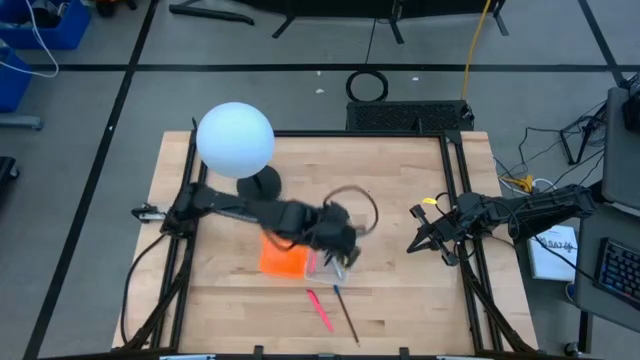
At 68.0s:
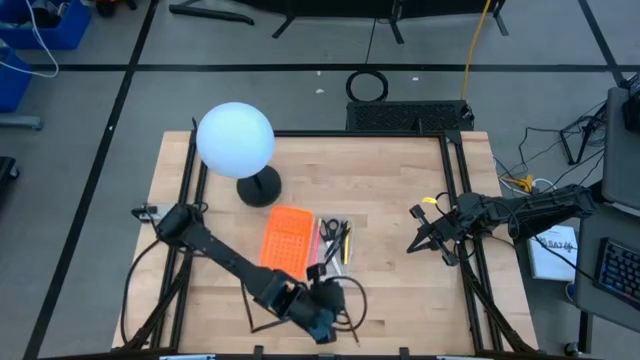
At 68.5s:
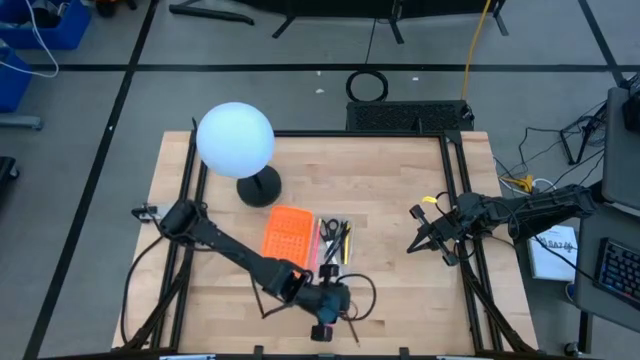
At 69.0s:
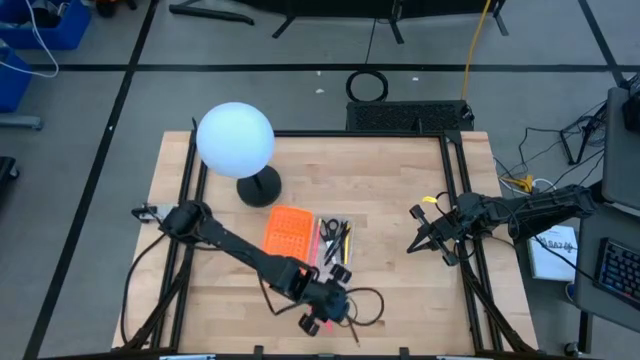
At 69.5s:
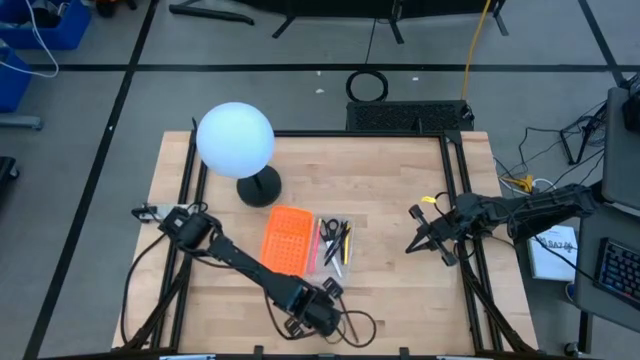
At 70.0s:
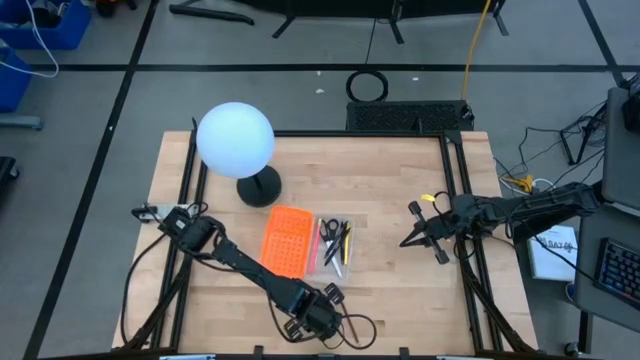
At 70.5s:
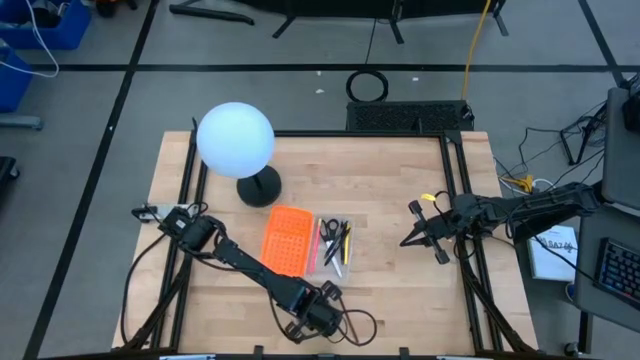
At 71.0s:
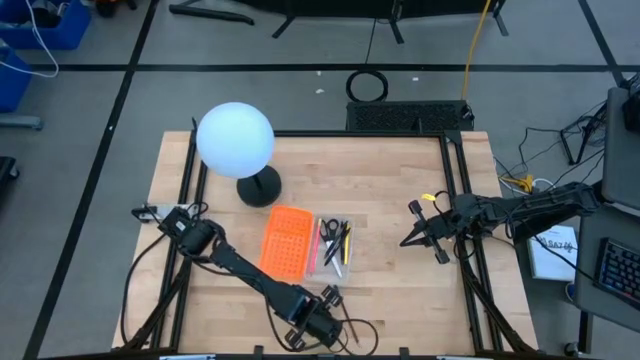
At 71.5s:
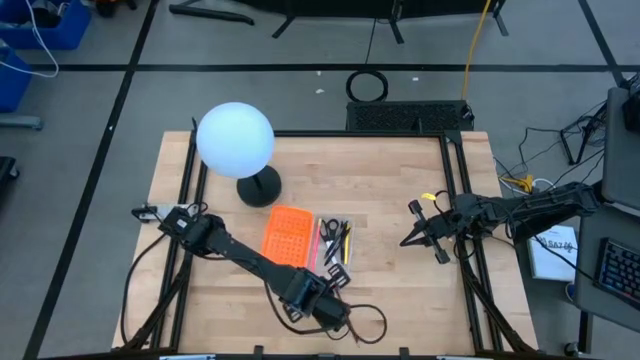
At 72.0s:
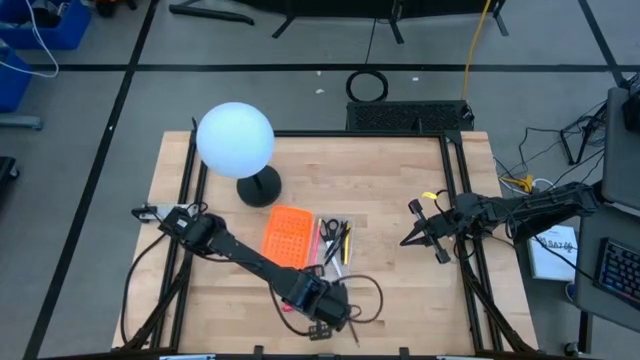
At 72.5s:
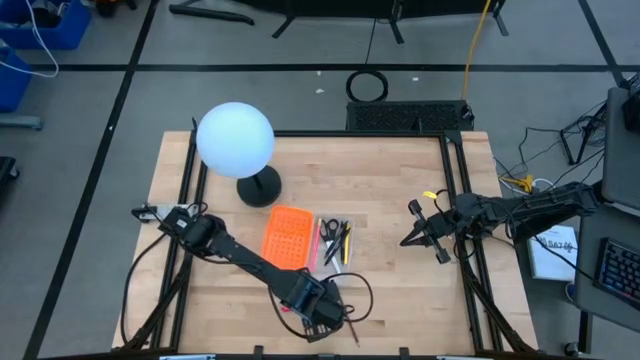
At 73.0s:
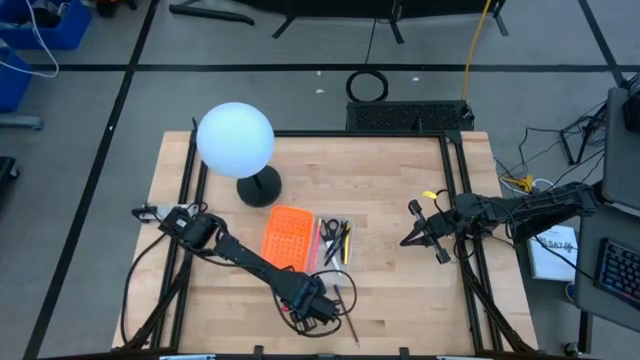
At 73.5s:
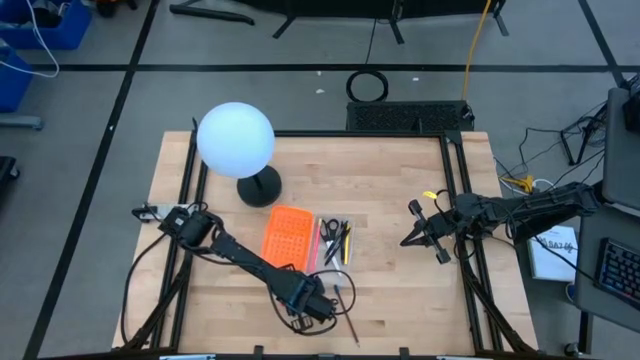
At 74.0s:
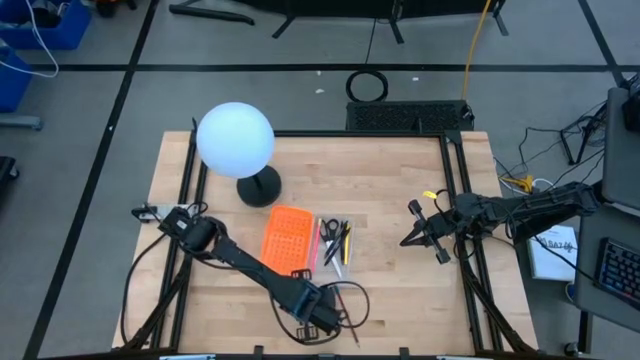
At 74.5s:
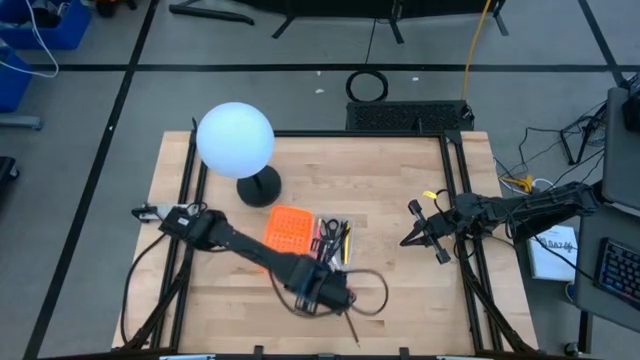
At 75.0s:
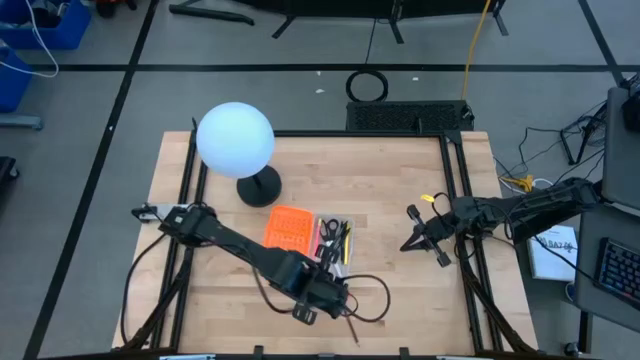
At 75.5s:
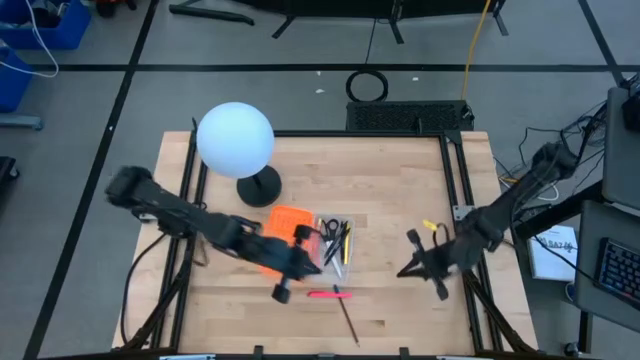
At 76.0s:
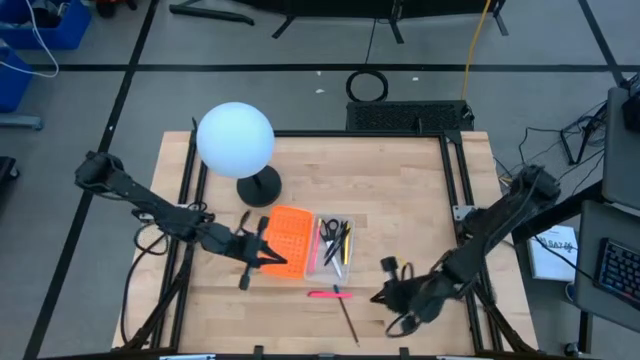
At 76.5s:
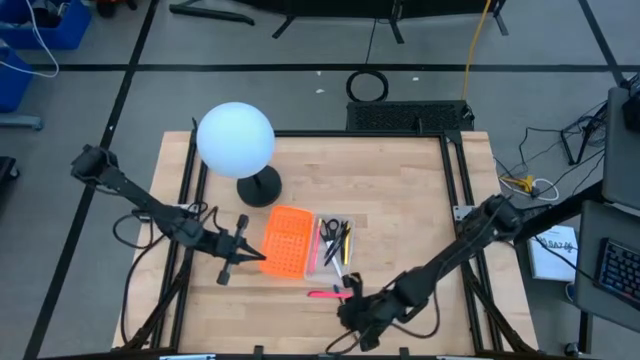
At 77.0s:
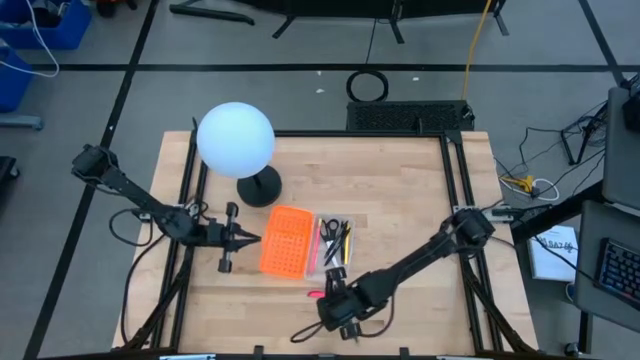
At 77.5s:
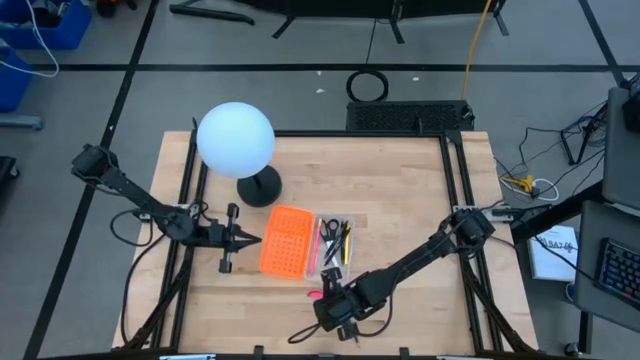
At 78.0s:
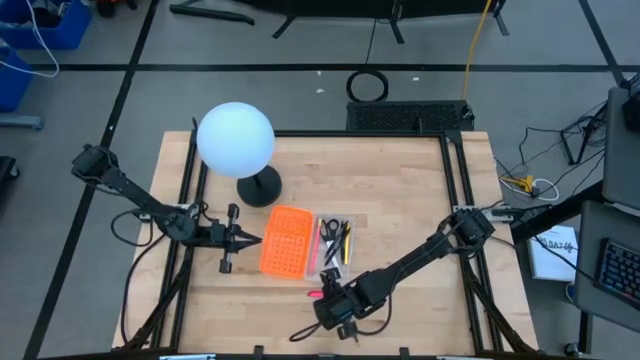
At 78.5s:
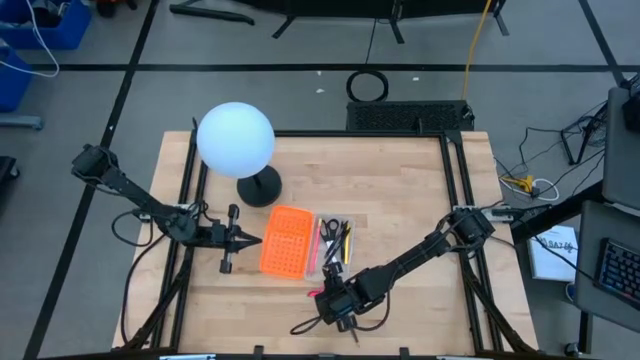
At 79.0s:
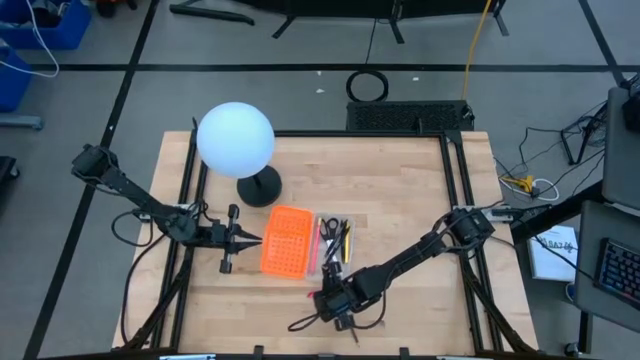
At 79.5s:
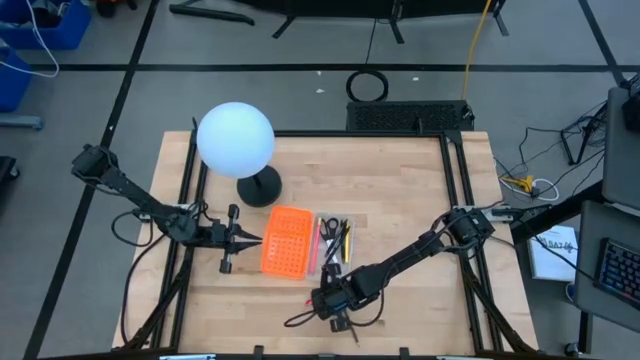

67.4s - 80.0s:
Task: Pick & place school supplies into a supply box
Put the pink pen into the transparent bin

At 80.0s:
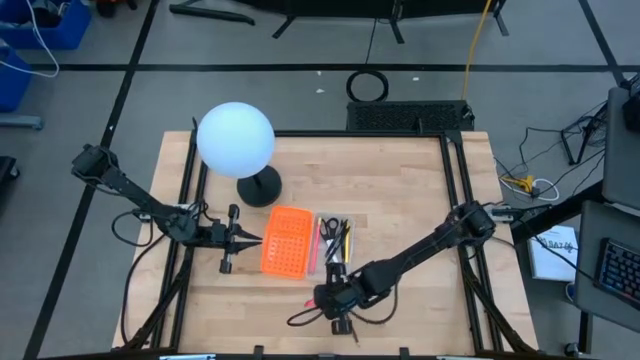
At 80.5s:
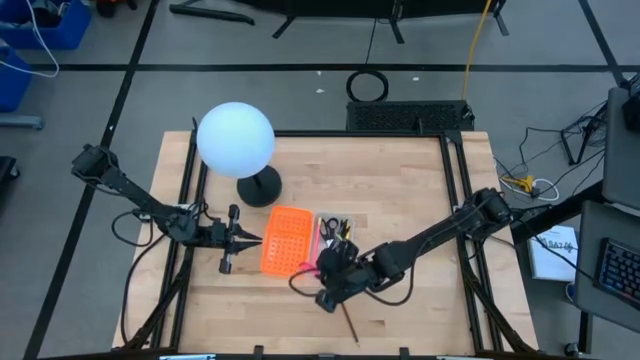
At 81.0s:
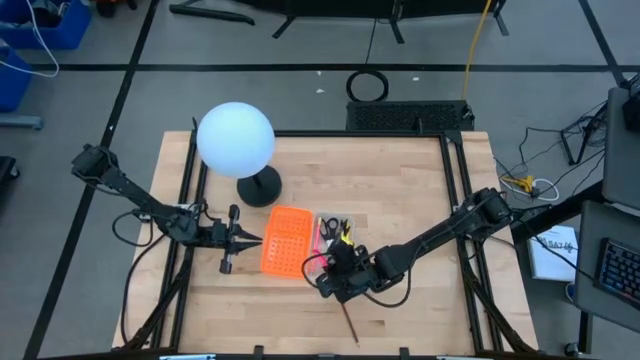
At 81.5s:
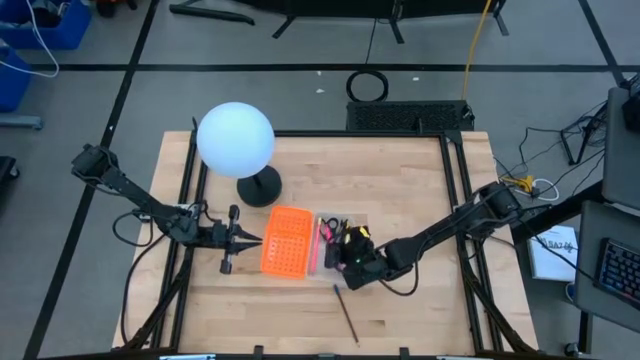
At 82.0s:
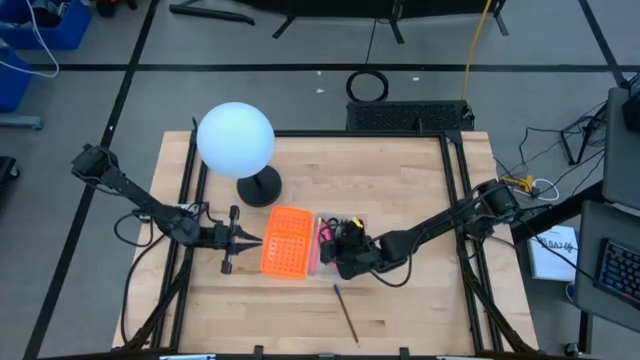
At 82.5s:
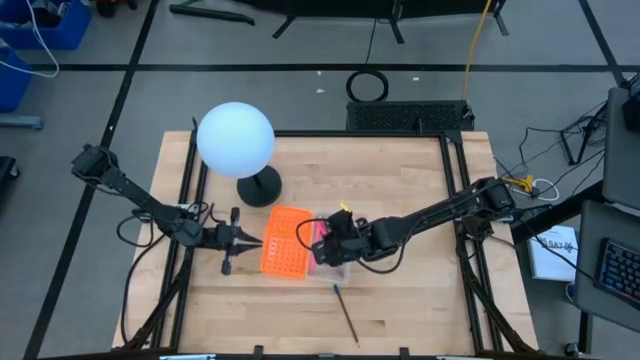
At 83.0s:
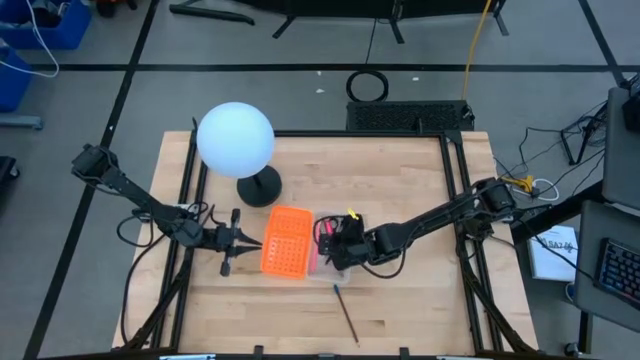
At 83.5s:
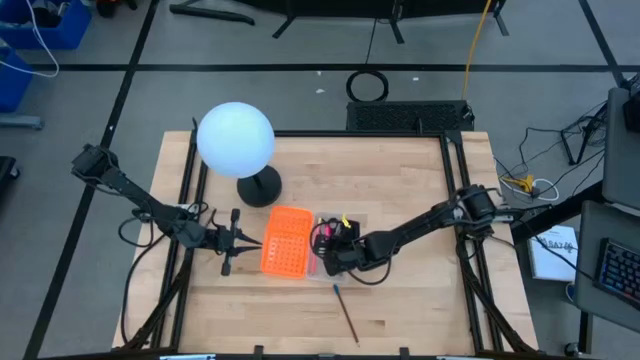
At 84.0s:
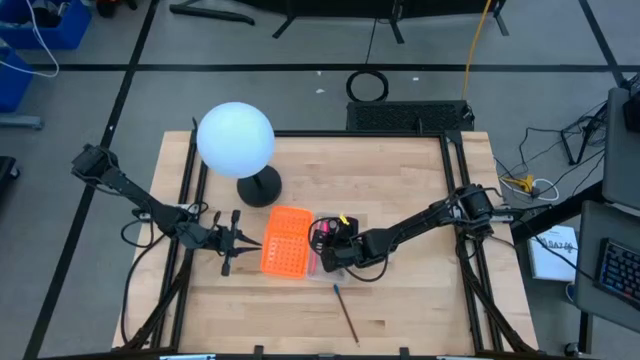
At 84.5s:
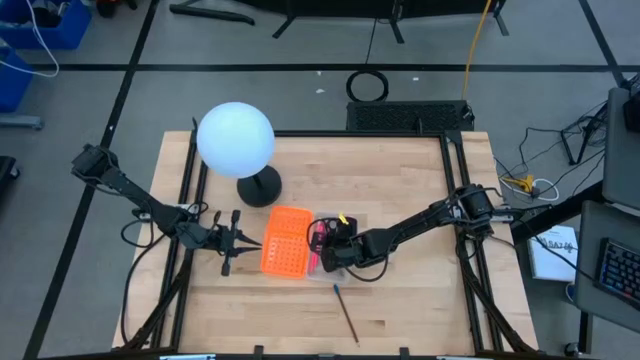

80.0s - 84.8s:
Put the pink pen into the transparent bin

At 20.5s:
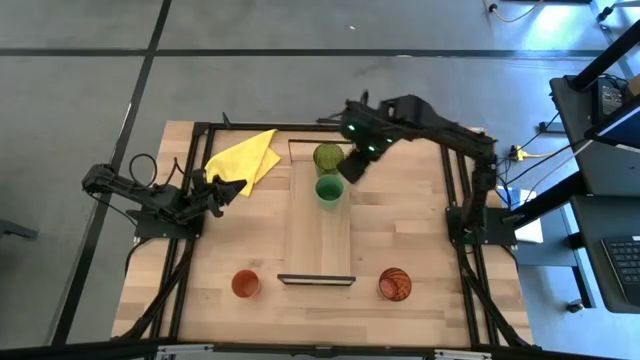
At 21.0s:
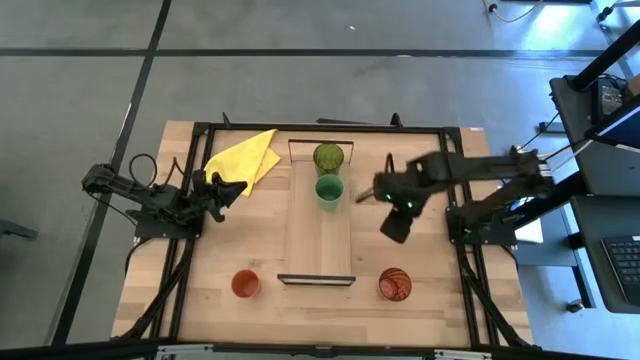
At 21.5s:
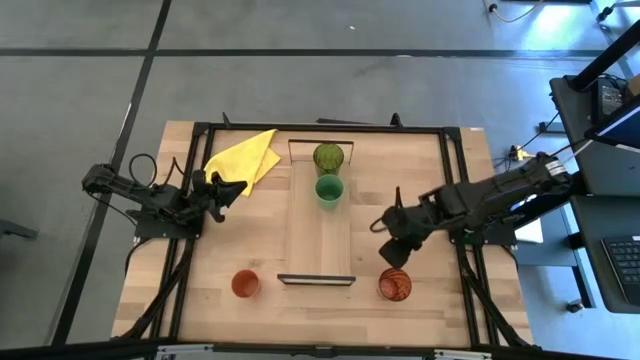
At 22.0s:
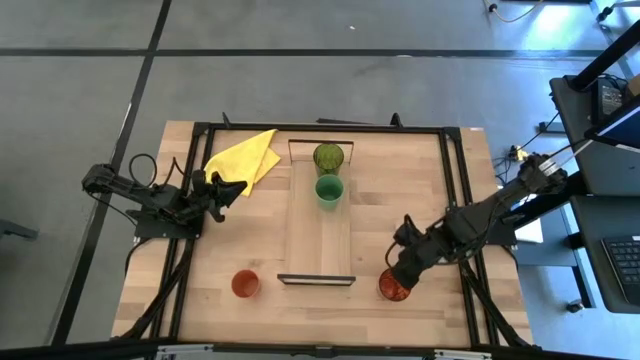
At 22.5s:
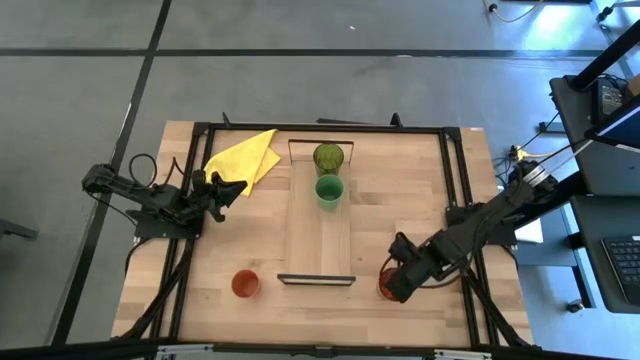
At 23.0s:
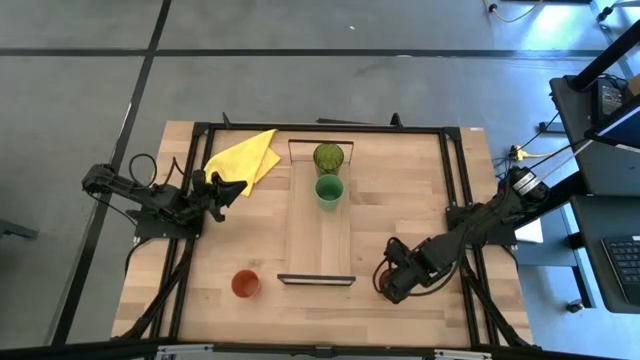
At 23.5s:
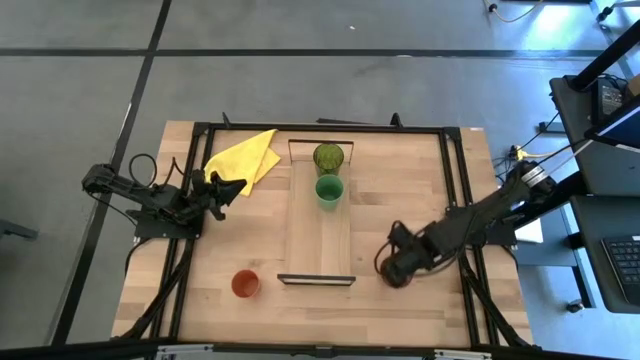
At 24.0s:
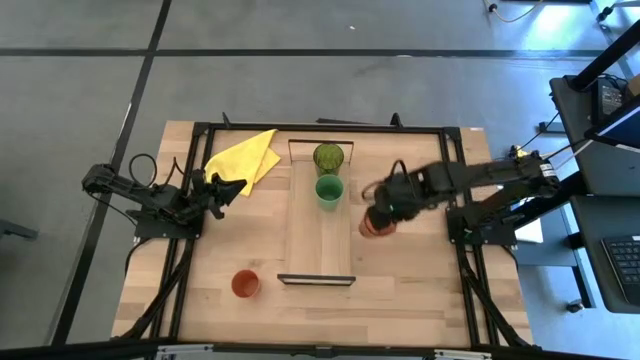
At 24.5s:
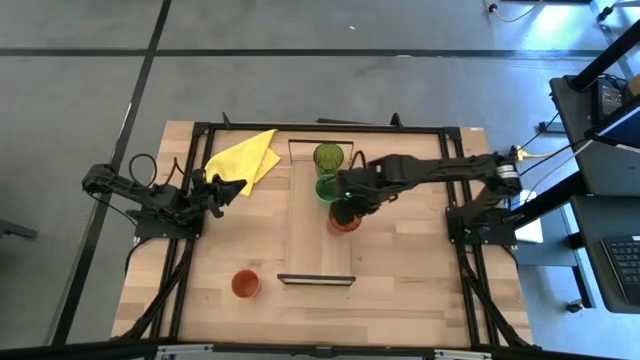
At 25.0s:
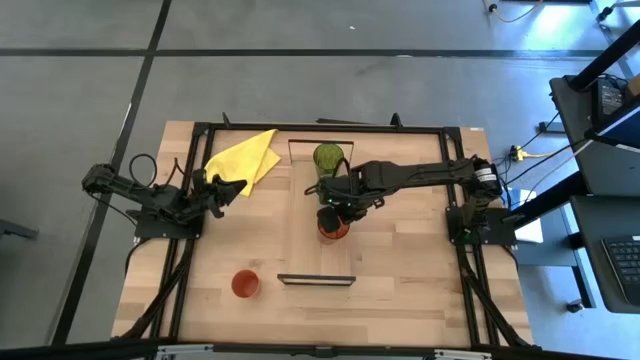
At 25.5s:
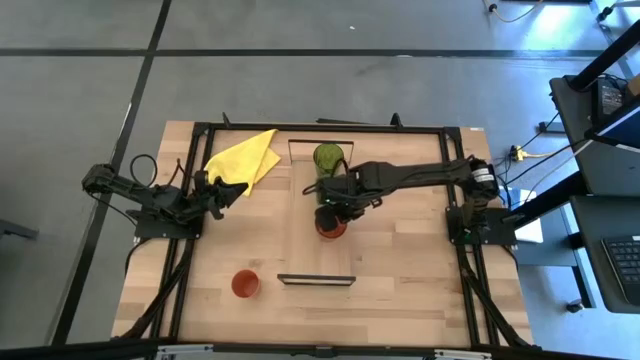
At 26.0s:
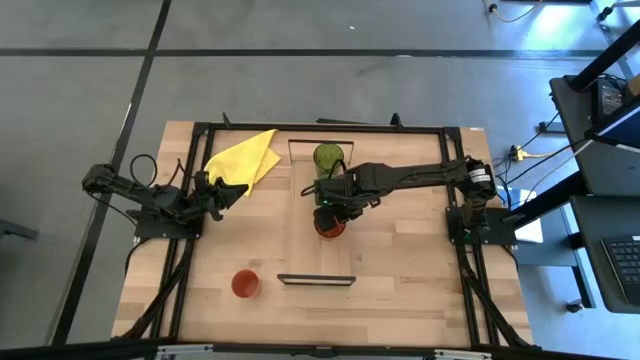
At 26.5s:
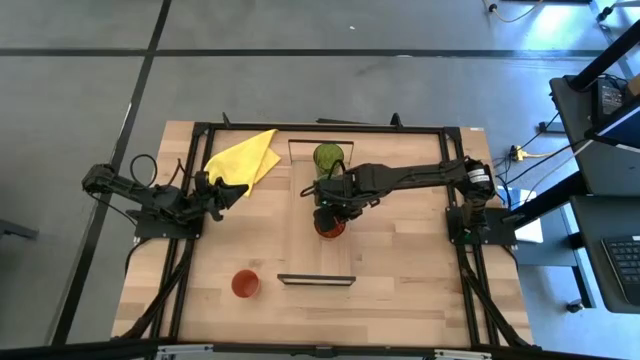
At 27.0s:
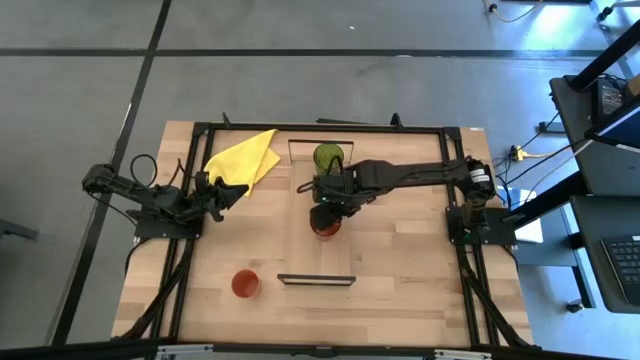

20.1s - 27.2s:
Task: Stack small to large cups/mugs on shelf
Put the orange cup on the shelf
